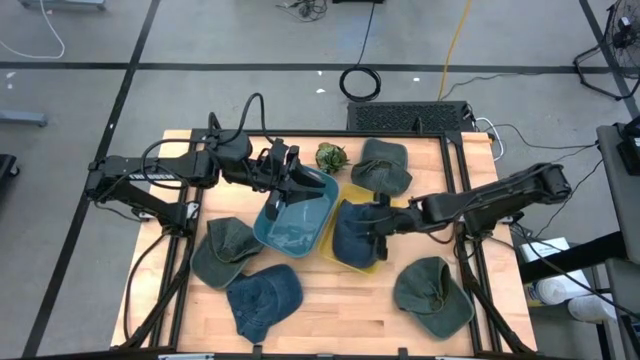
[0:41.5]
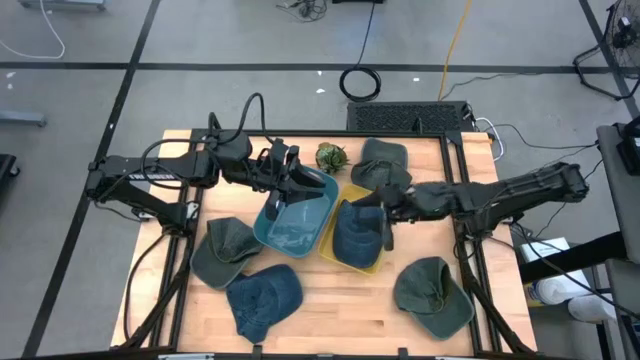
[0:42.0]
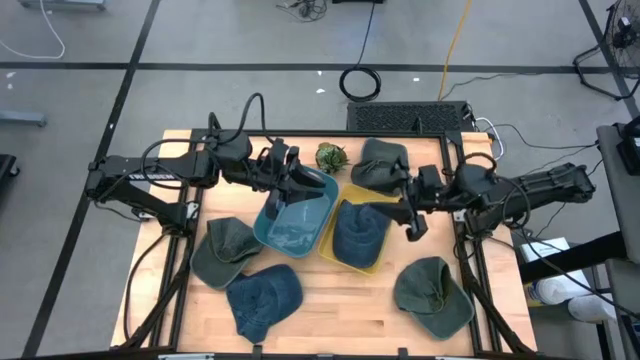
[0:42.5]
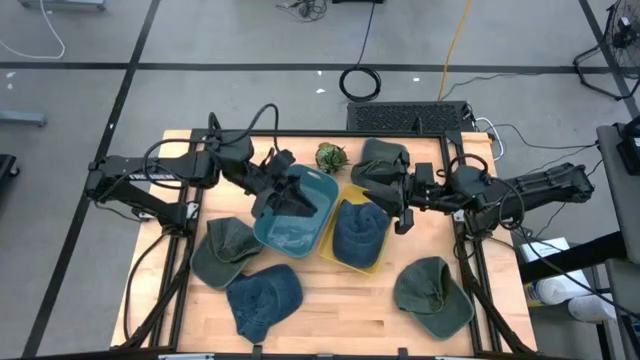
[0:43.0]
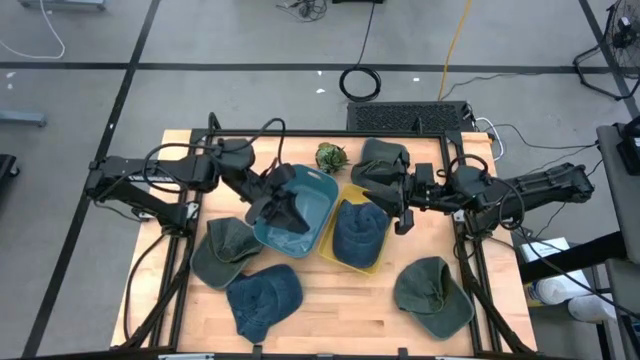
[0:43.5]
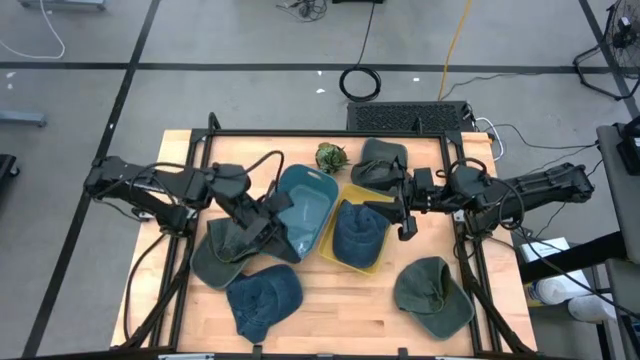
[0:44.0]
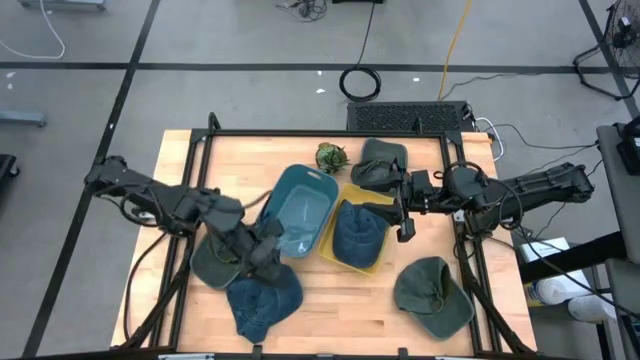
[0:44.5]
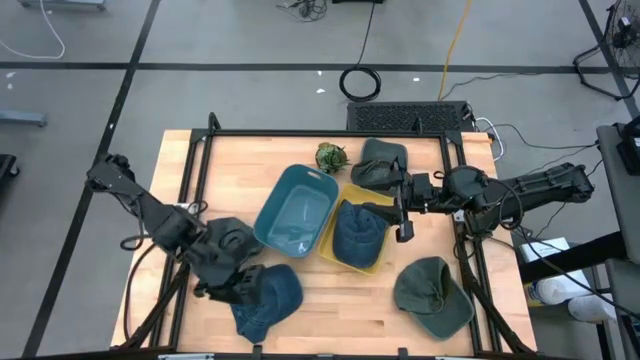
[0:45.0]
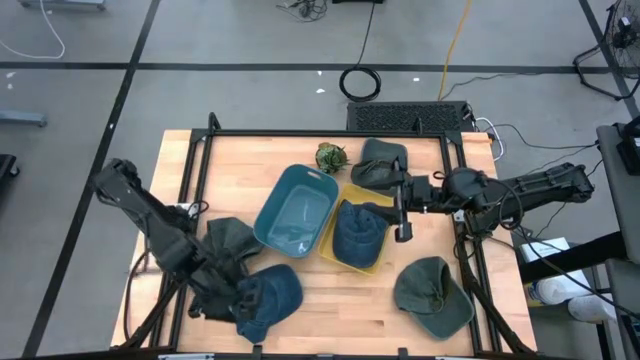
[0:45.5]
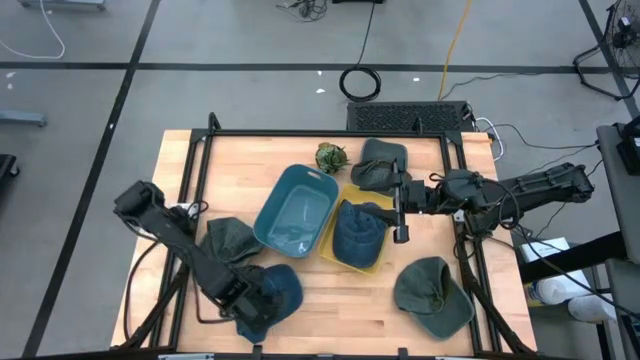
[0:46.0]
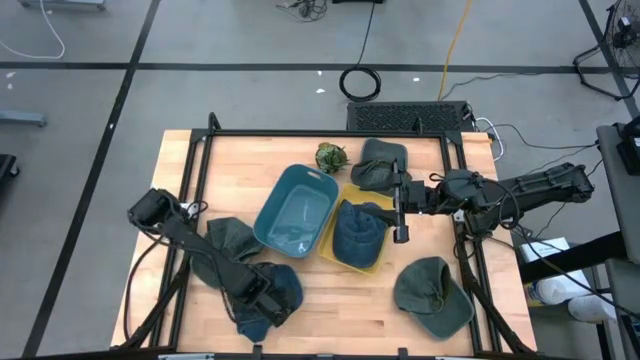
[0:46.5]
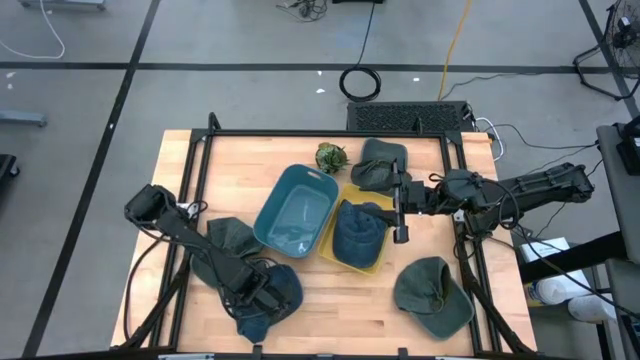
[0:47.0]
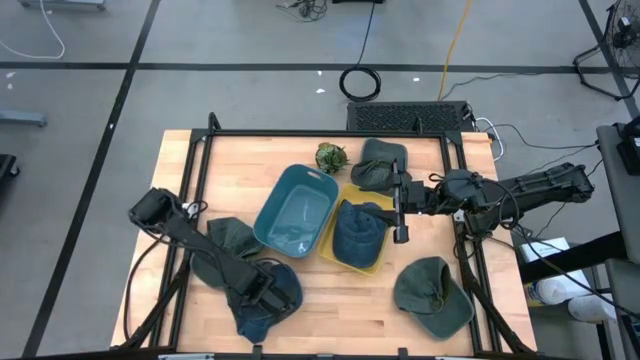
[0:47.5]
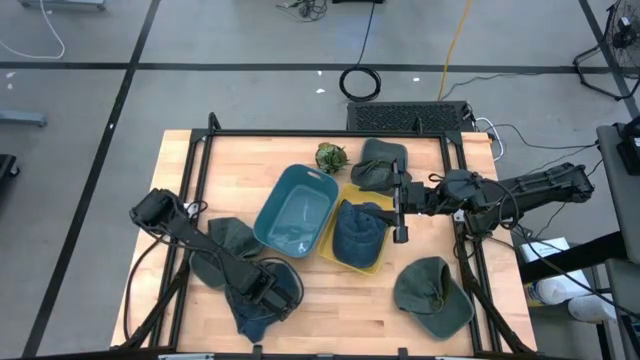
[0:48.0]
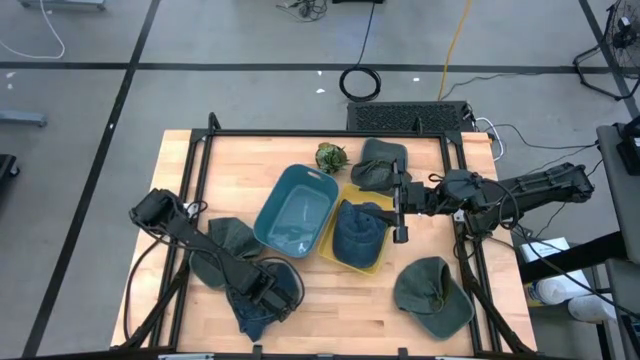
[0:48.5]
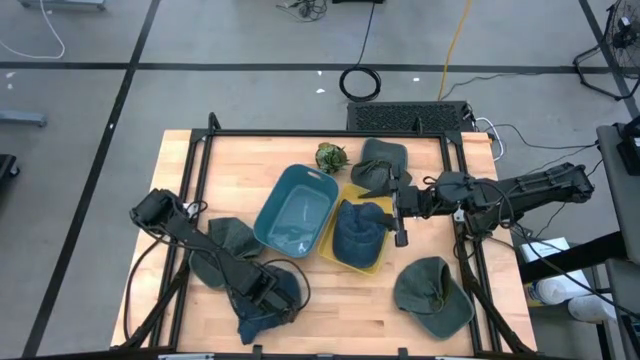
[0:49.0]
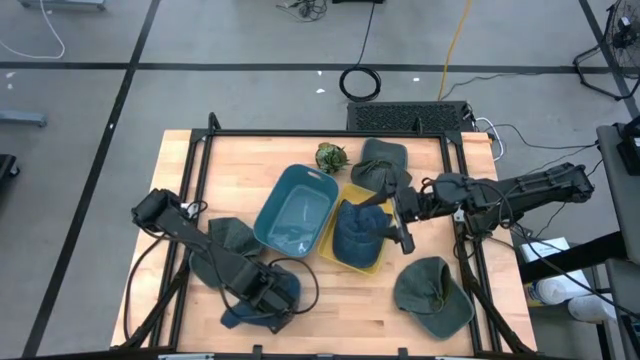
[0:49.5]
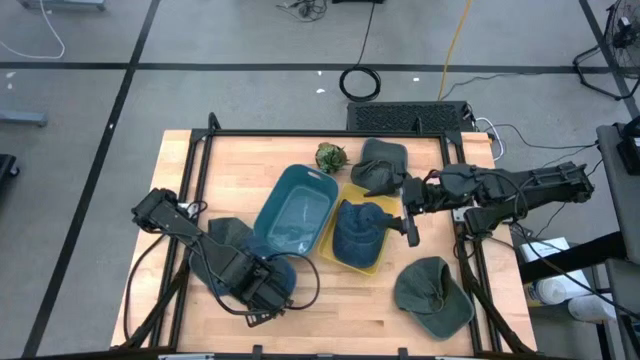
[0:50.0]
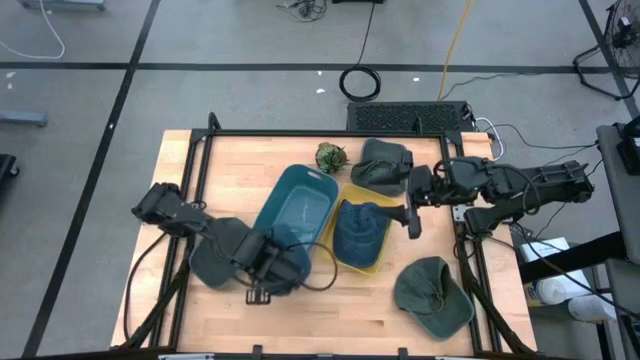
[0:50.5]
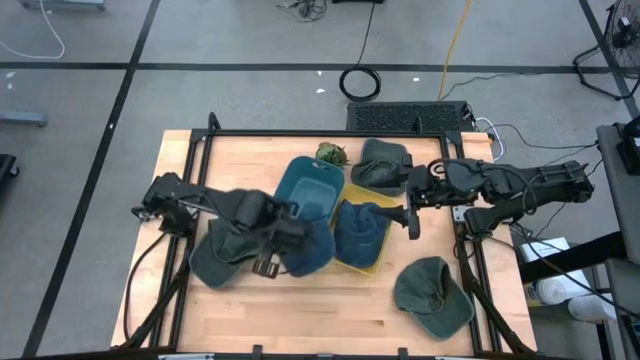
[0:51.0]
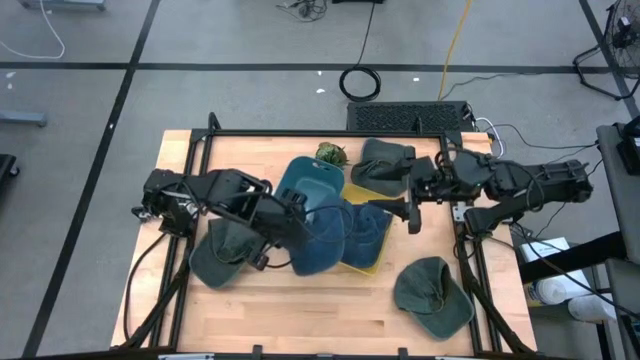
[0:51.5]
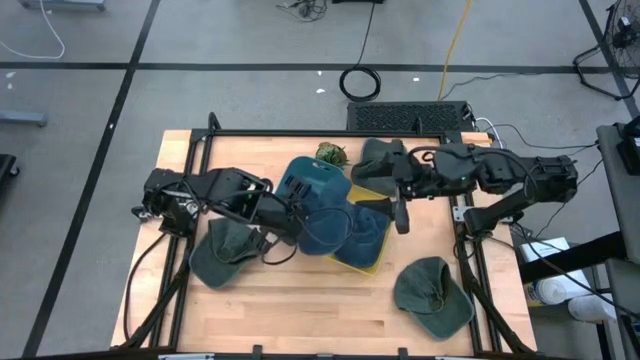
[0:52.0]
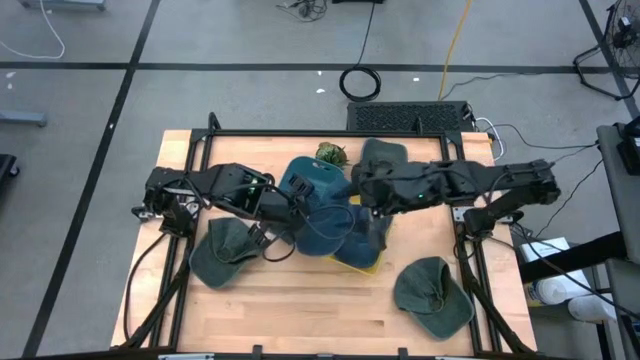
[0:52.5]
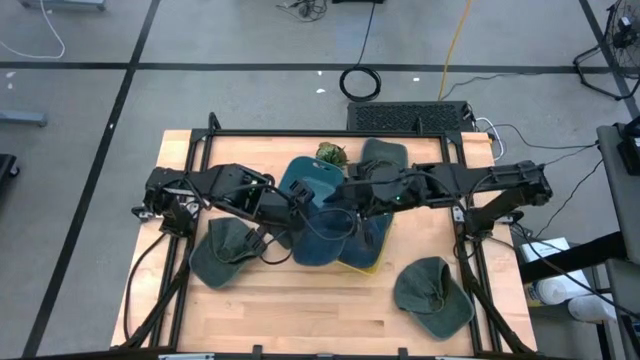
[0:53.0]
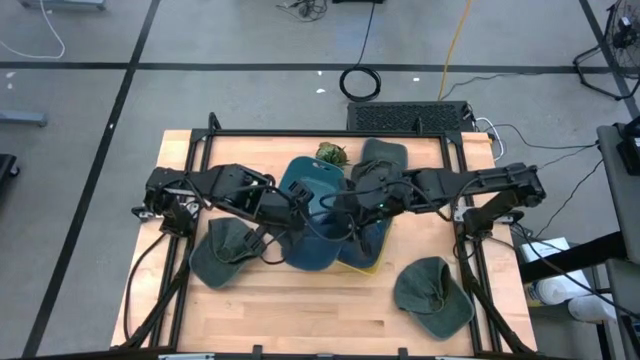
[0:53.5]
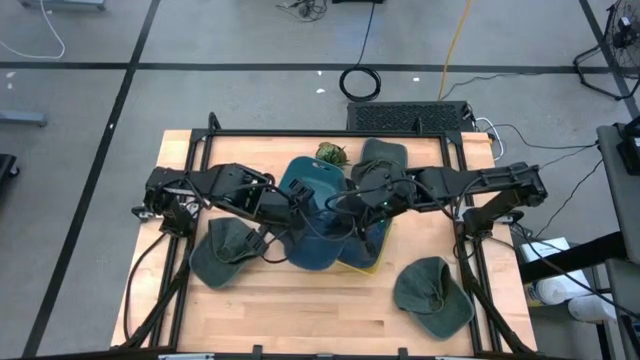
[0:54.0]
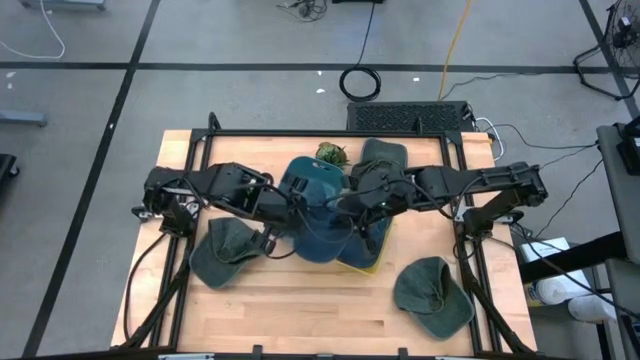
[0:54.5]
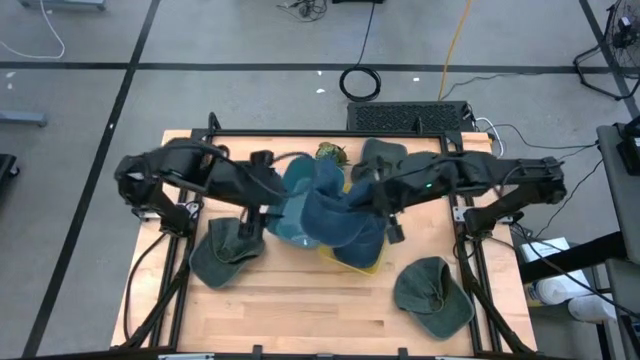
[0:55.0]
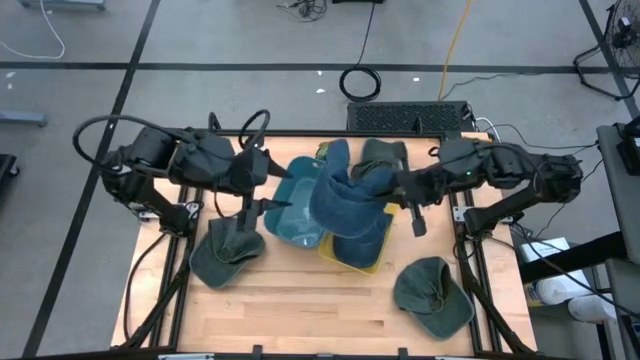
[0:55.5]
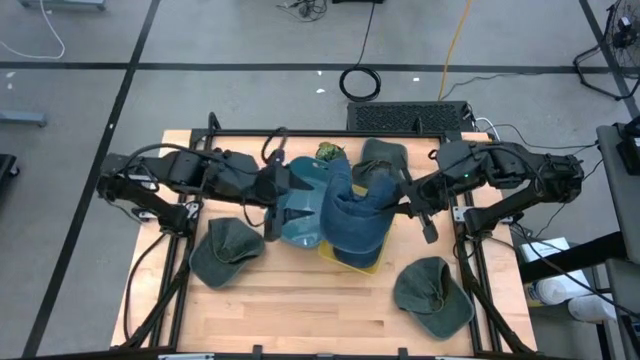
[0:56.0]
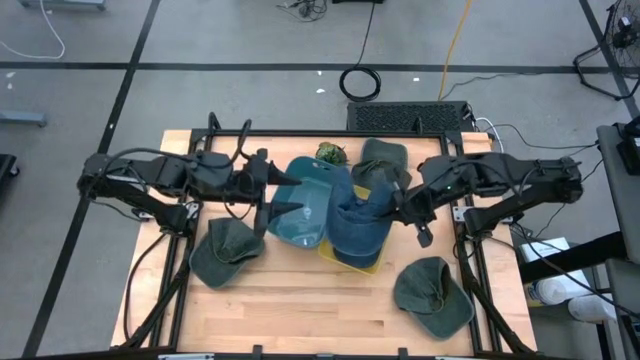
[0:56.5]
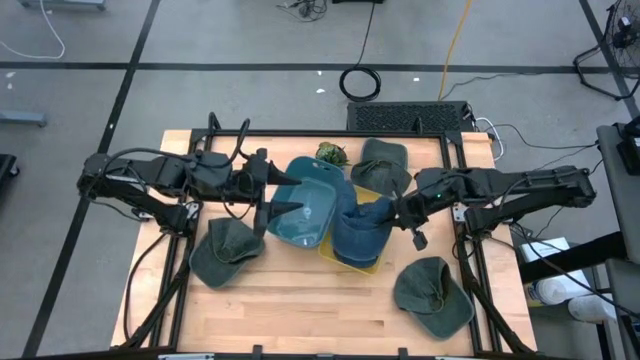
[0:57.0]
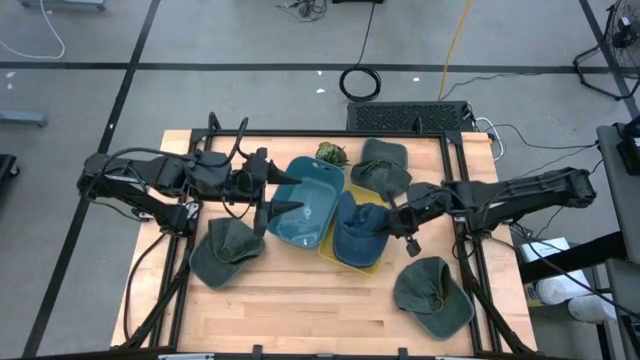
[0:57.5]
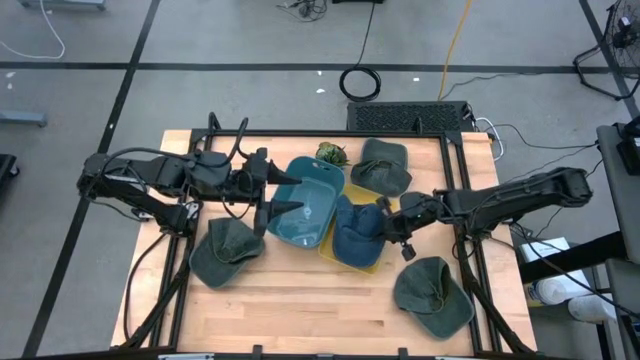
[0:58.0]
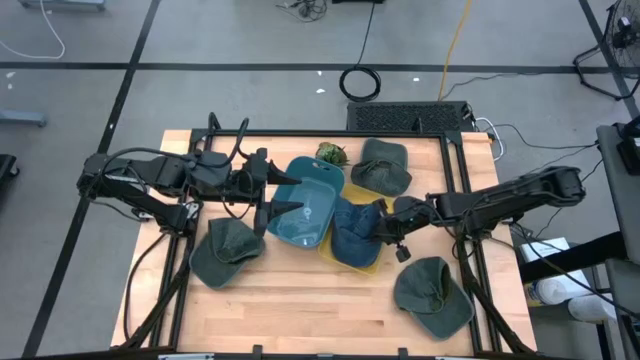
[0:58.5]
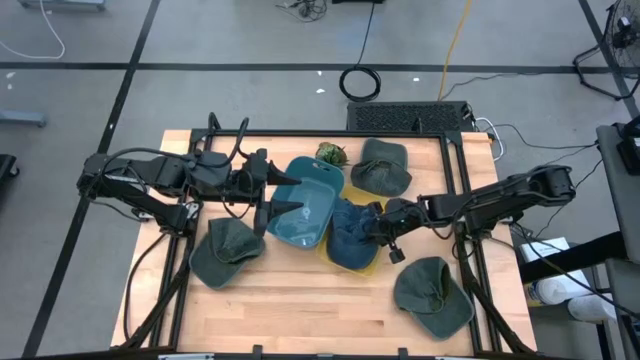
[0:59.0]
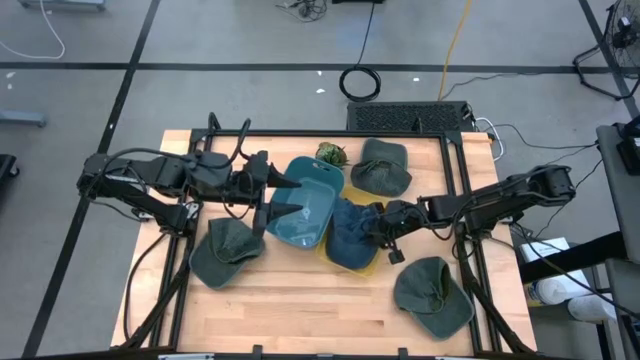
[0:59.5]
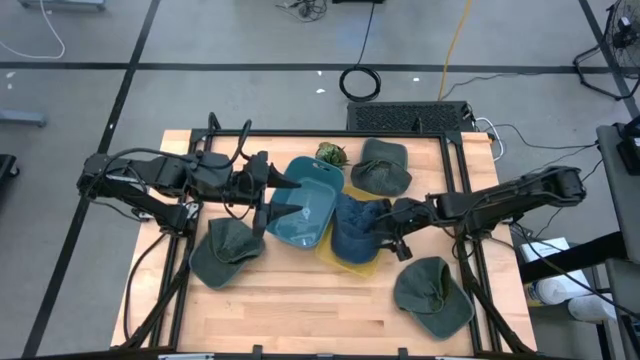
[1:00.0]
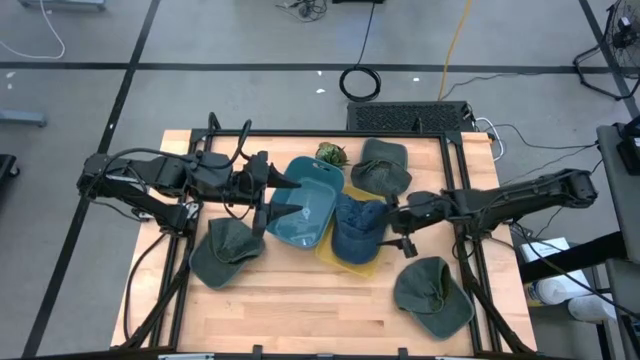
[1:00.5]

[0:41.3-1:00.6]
Task: Pick & Place hat
Put the blue cap into the yellow bin

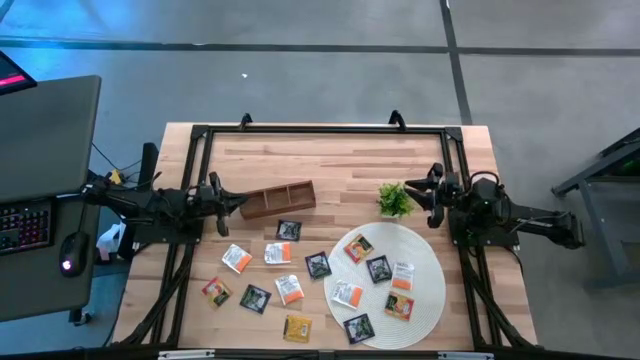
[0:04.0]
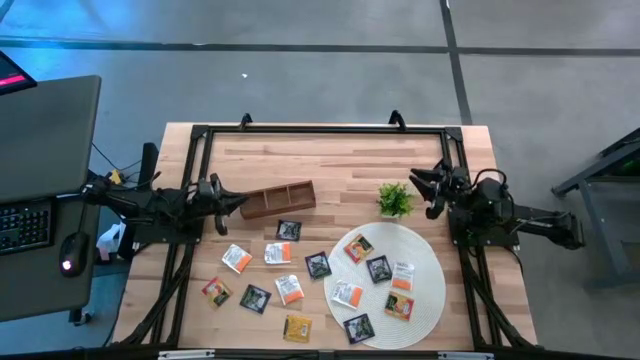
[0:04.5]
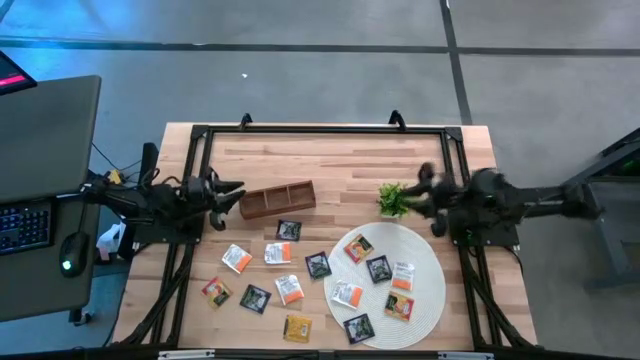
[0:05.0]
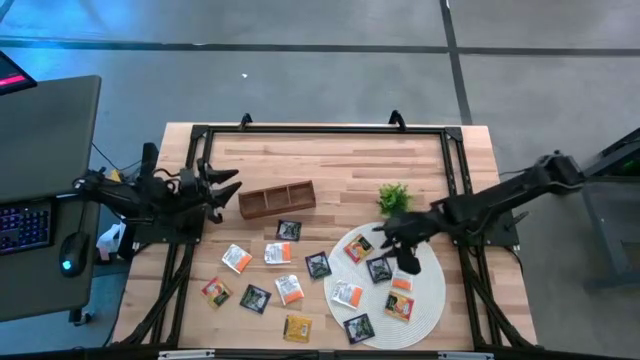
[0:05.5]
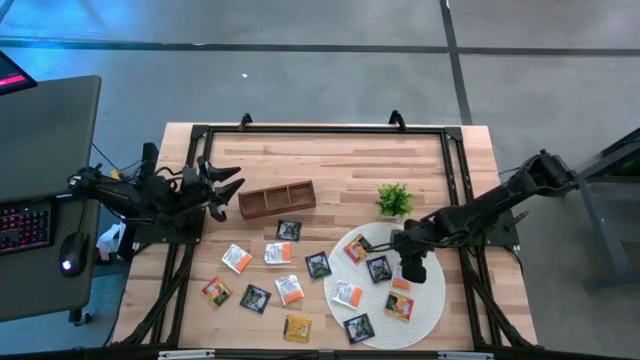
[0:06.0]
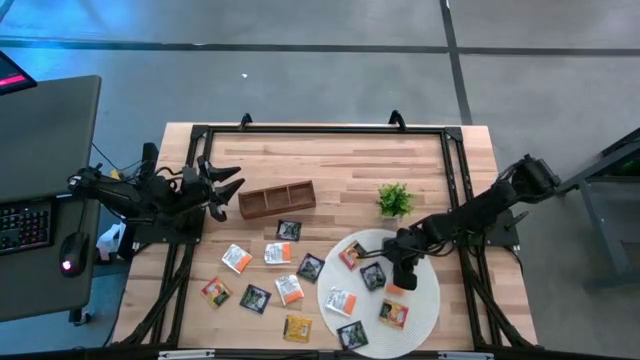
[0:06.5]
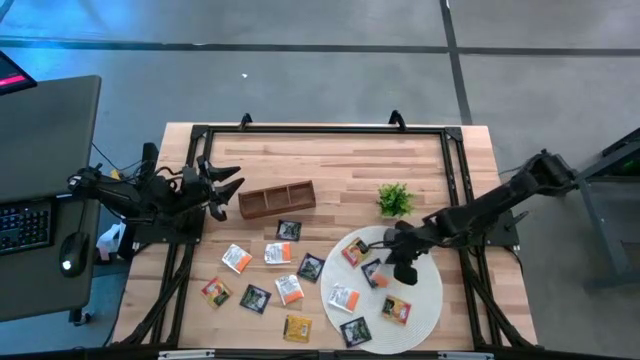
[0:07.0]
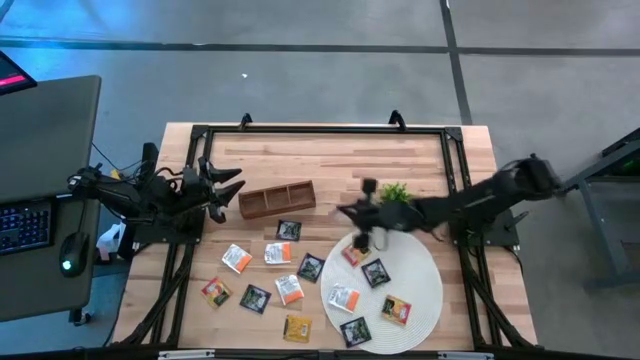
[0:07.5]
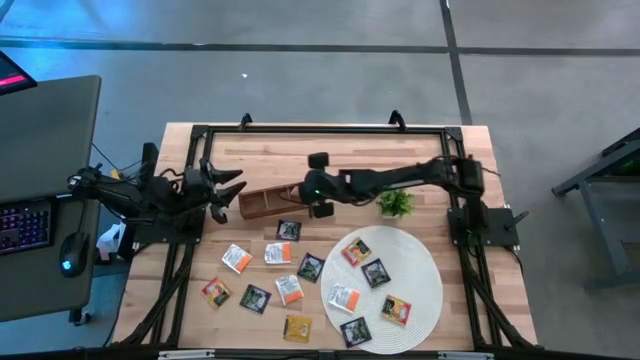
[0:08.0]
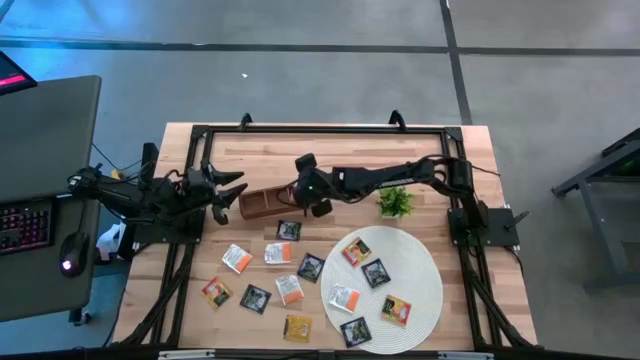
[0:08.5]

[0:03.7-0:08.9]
Task: Pick & Place Tea
Put the white tea bag into the right section of the wooden organizer
